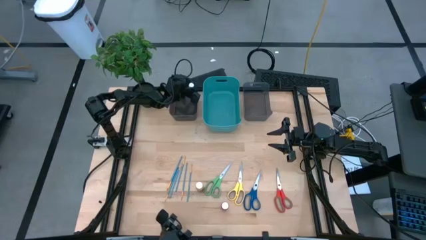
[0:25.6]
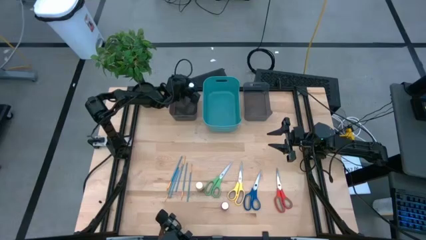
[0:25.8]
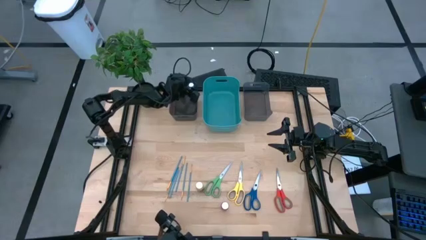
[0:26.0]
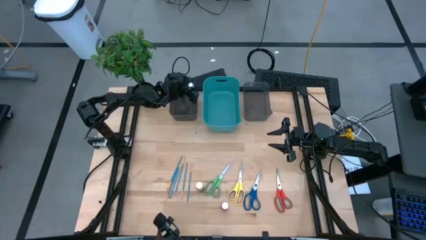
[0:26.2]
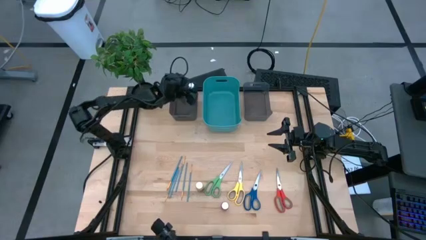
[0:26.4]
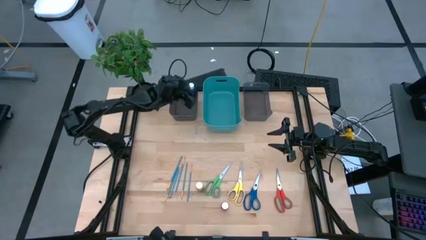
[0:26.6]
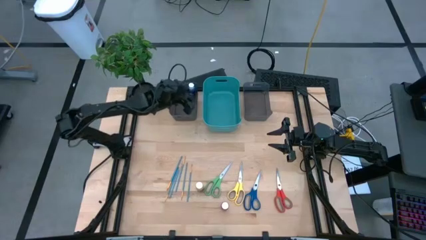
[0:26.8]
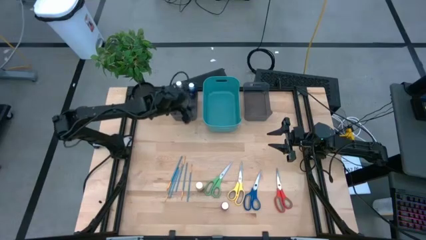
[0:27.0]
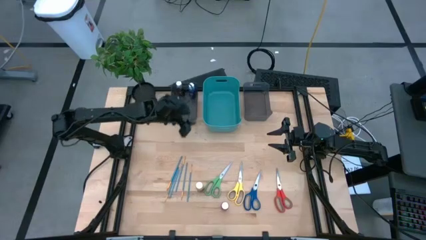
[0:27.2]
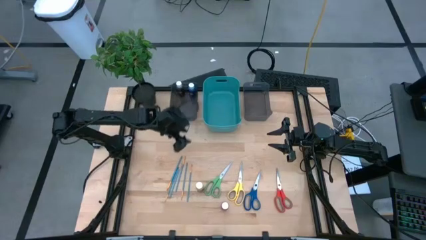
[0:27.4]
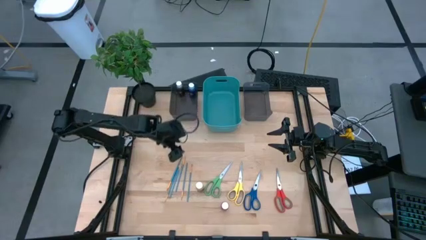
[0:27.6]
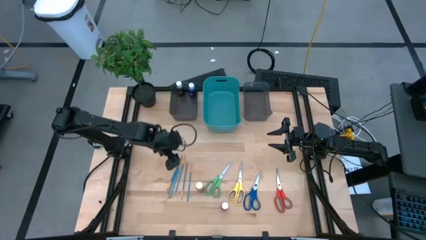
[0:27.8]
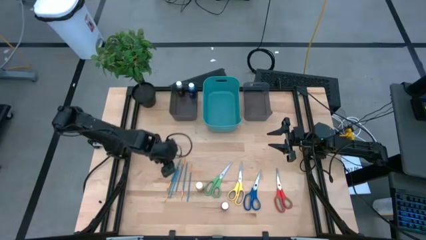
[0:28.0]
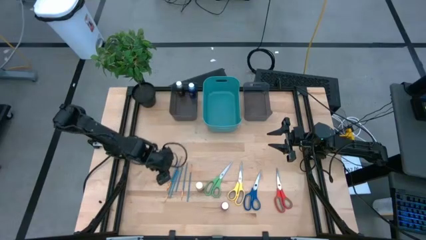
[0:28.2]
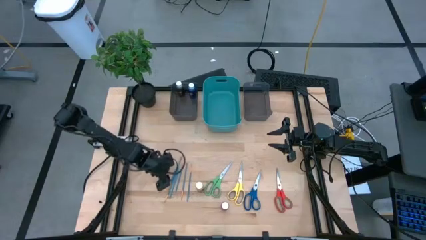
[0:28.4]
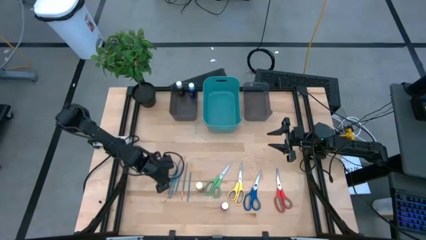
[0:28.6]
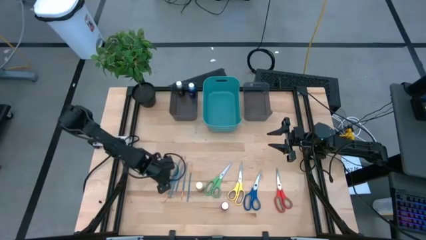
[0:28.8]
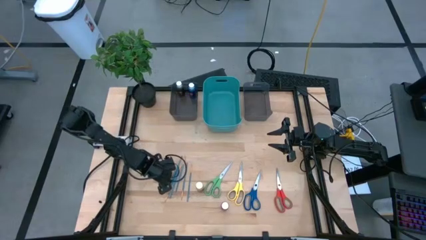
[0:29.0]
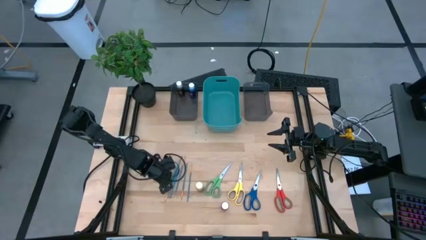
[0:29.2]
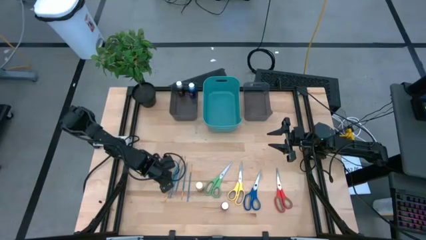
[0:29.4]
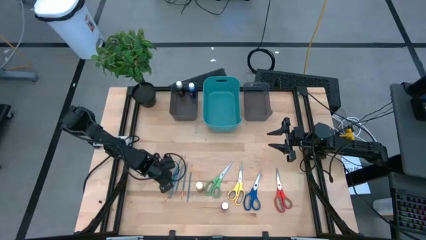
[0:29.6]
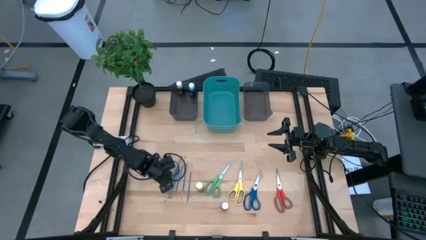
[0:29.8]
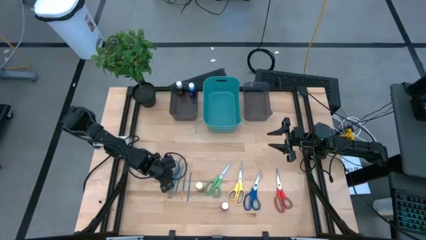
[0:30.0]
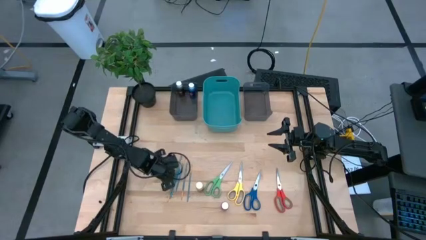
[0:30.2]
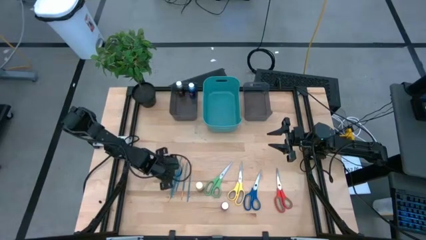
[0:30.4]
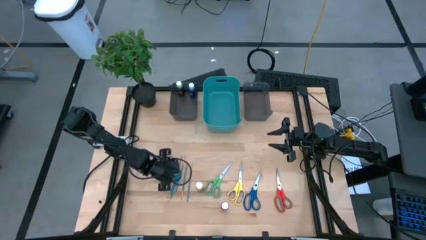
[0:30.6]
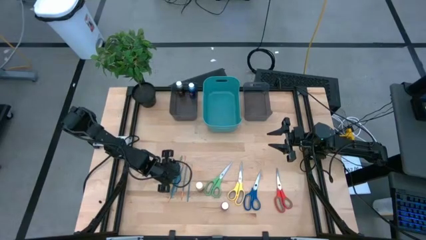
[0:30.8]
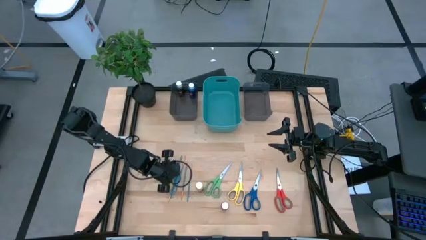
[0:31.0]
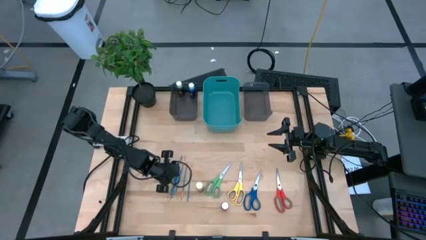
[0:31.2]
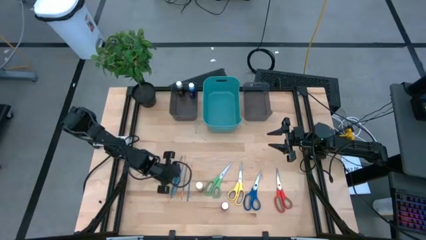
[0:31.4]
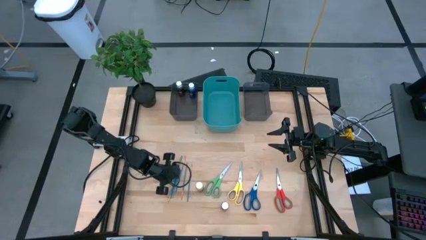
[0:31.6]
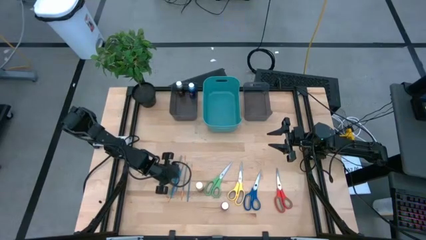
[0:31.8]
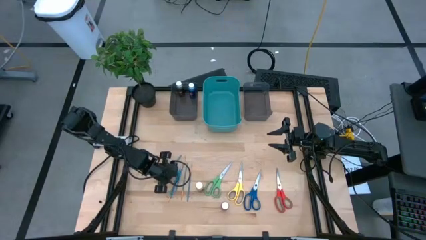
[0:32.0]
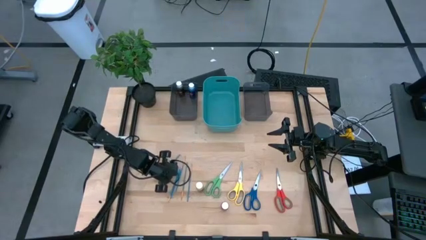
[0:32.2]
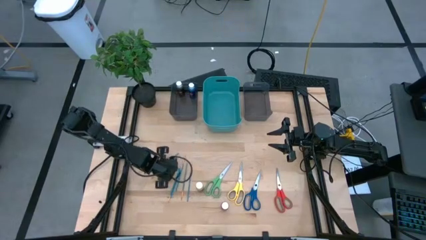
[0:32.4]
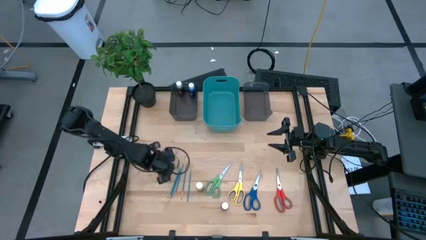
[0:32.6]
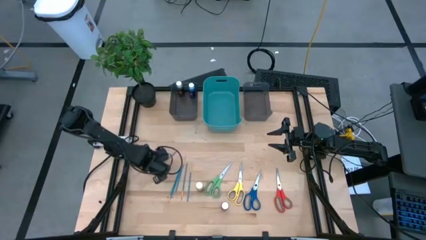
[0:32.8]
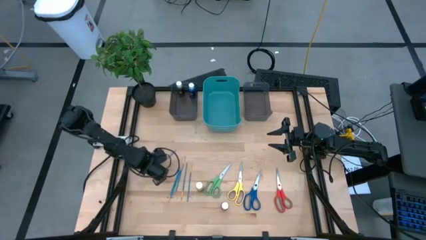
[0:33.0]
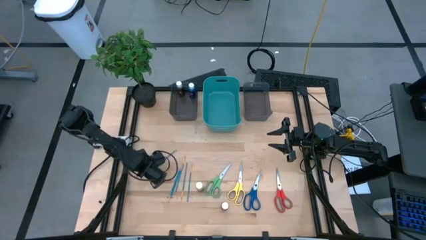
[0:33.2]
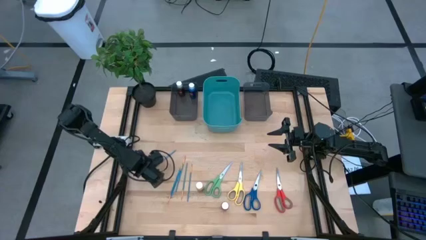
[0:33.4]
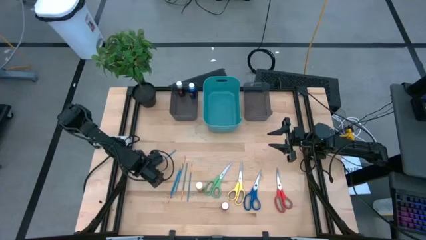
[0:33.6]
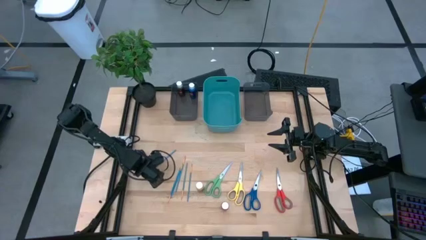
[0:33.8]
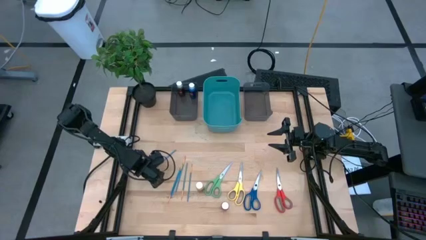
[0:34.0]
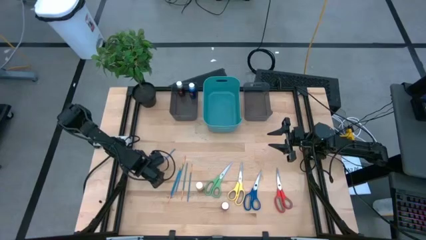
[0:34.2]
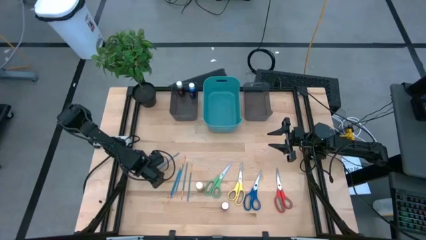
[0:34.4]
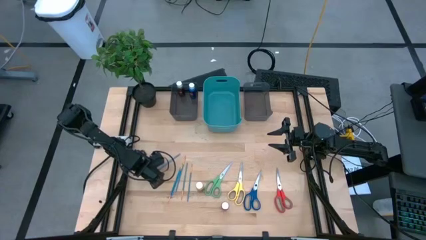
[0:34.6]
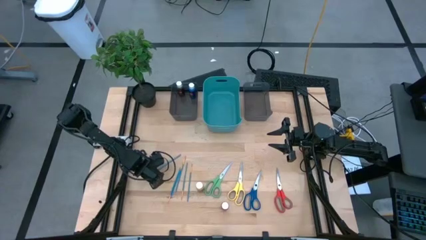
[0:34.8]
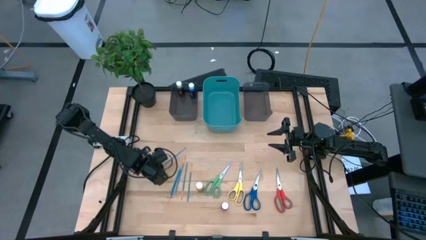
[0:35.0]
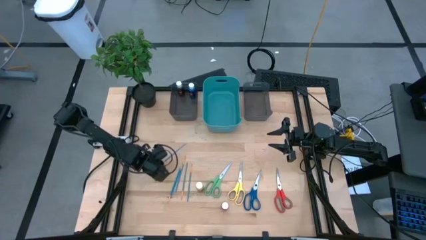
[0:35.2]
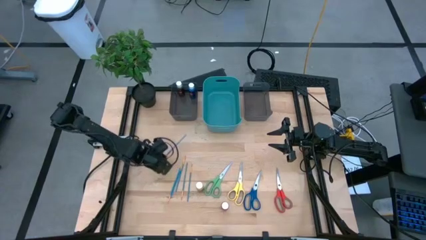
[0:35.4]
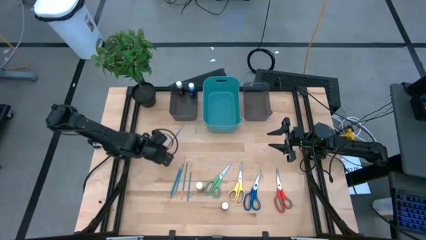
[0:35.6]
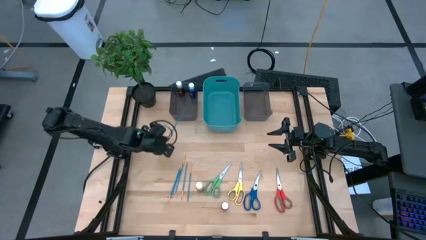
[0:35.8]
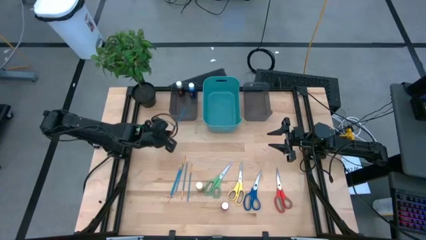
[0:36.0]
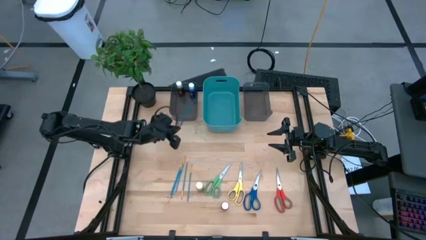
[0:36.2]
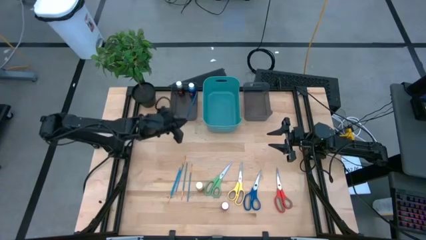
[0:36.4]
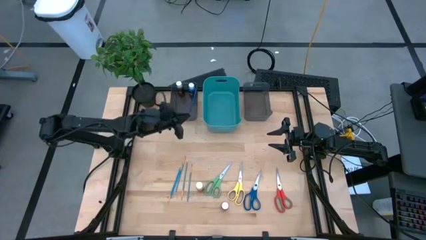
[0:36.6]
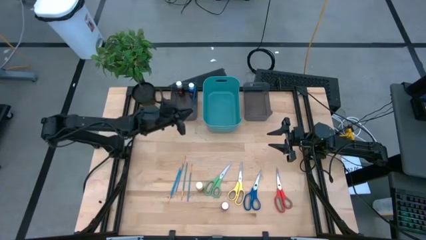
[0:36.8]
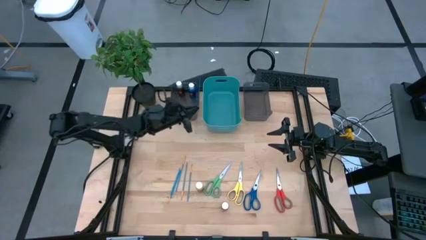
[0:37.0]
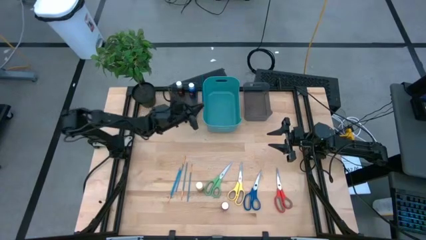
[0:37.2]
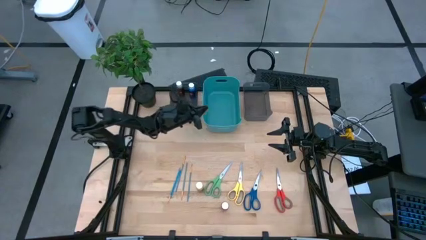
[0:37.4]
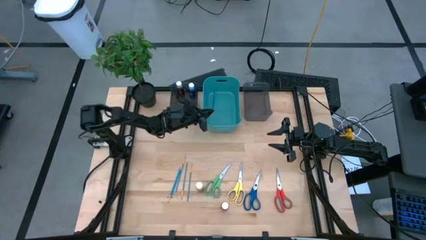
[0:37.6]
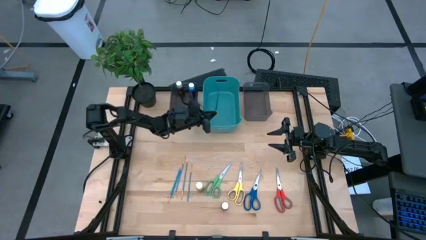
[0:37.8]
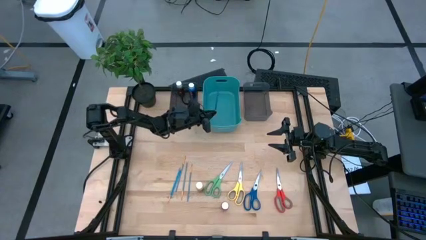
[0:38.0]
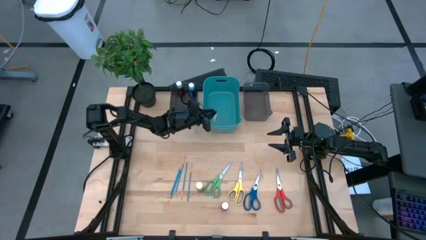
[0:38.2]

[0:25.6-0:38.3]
Task: Pick & Place Paint Supplies
Put the blue paint brush into the blue bin
